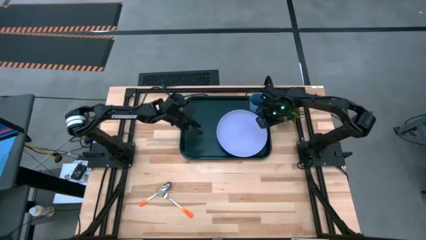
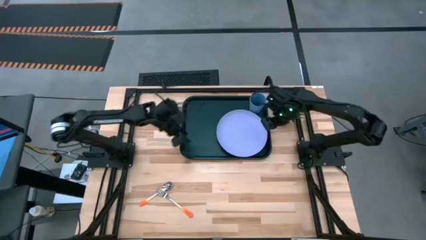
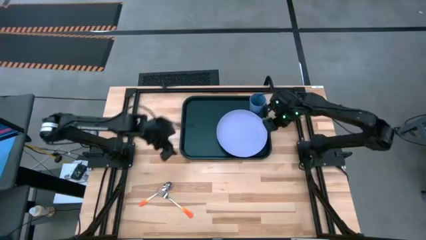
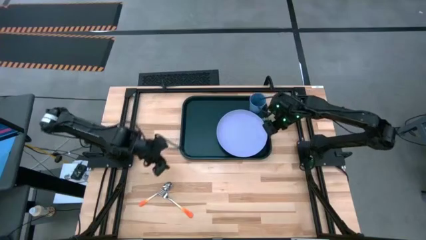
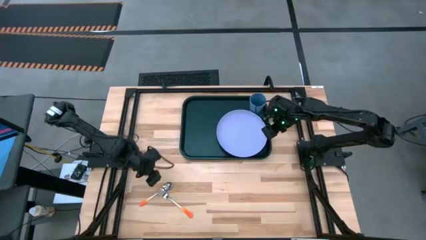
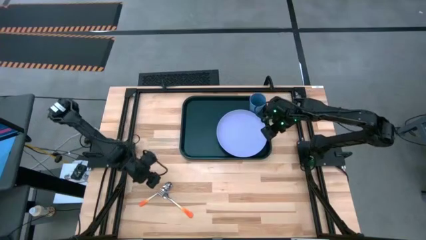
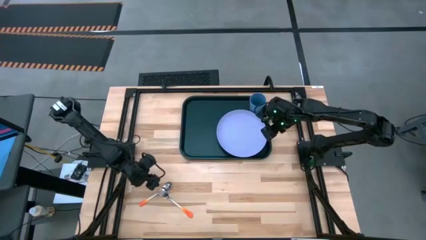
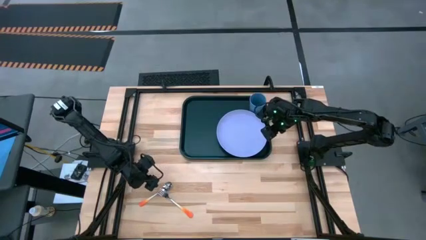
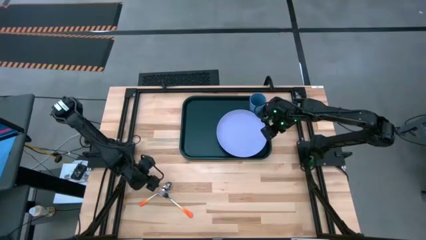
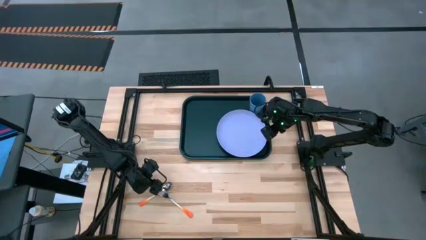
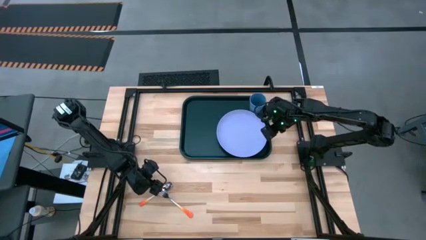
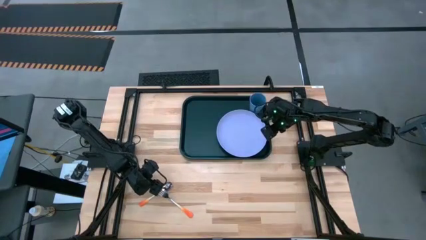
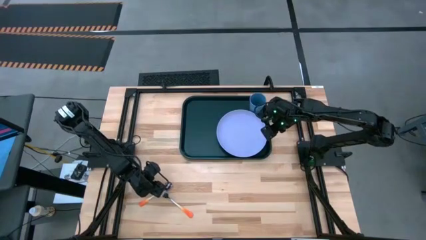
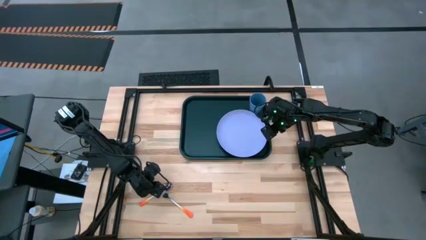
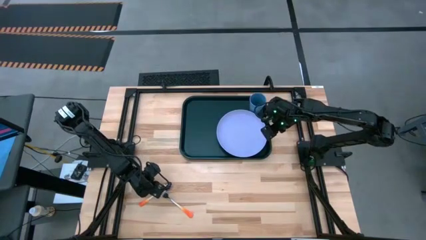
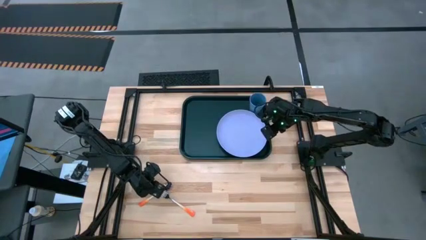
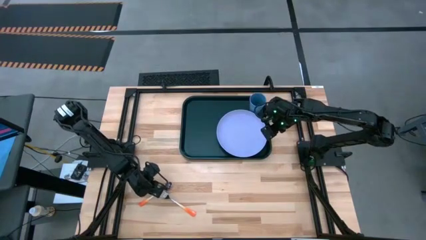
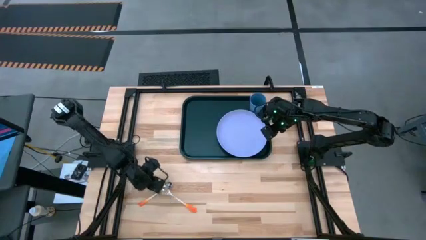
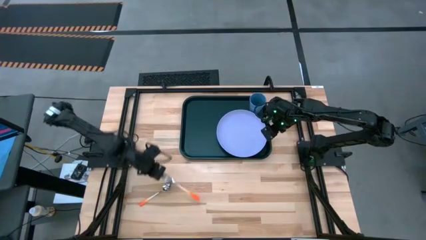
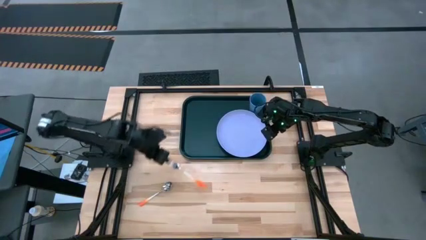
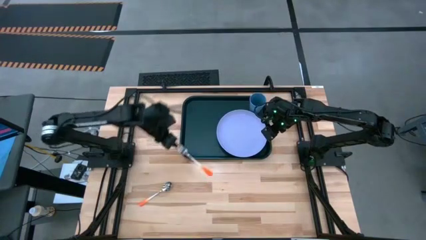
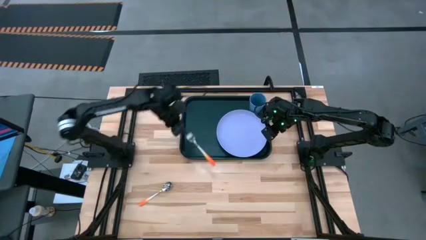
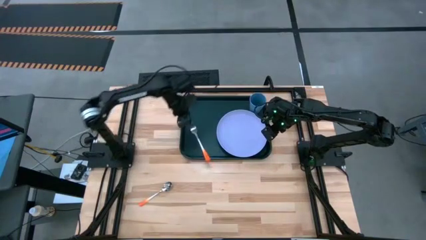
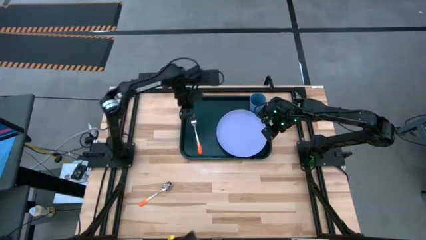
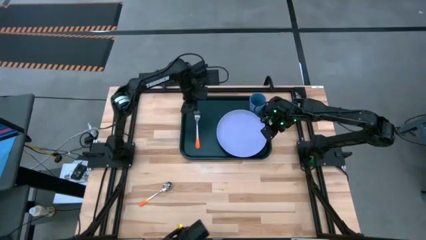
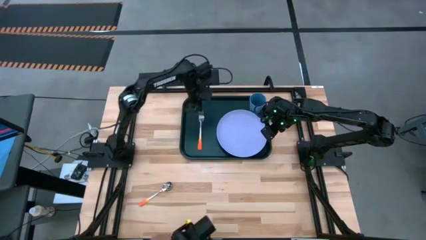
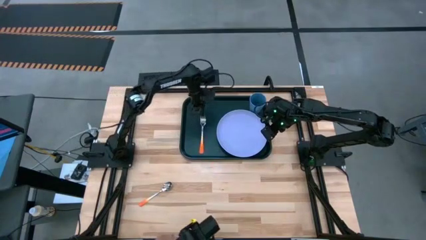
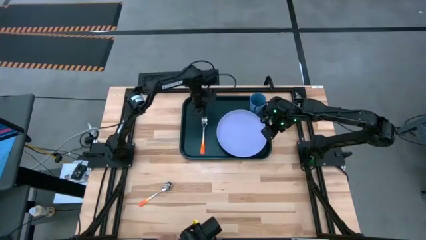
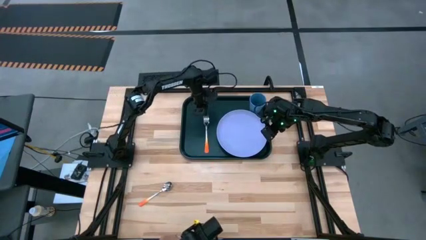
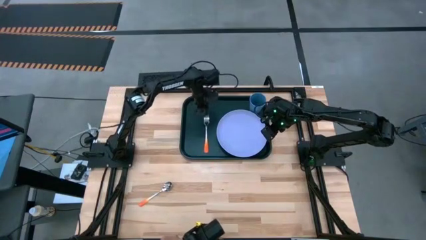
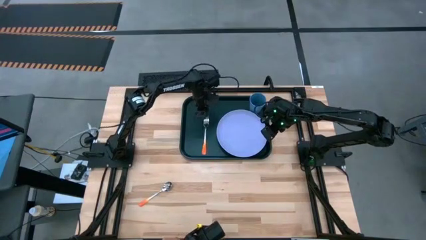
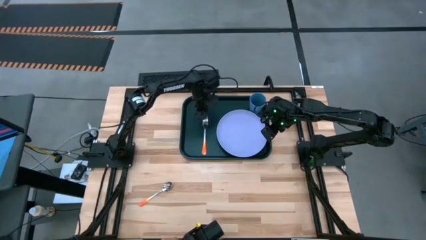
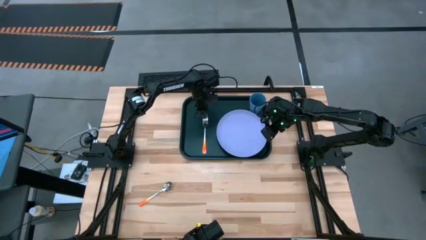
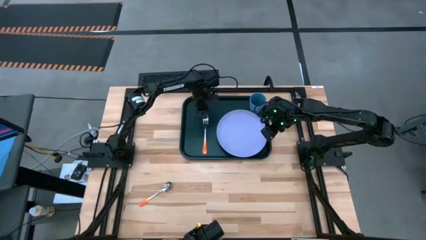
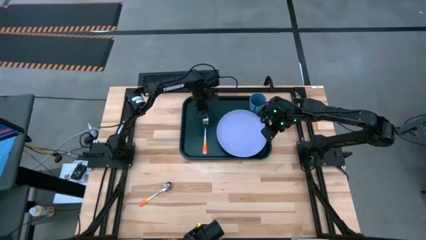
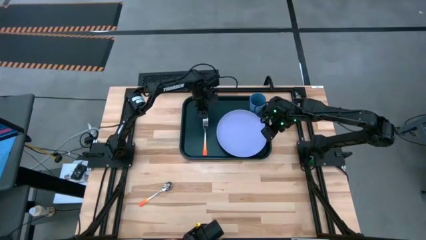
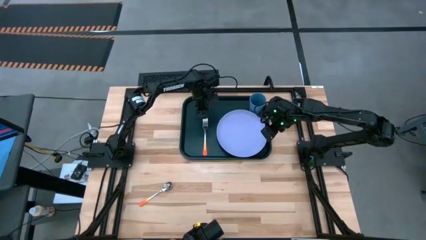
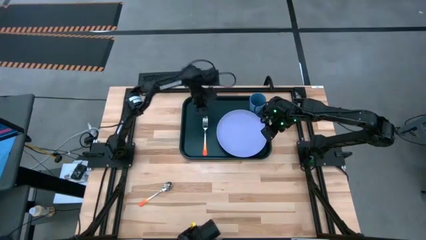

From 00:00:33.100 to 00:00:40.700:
Task: Pick and place plate/cup/fork/spoon on tray
Put the orange fork on the black tray to the left of the blue plate

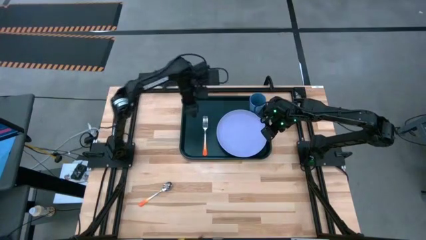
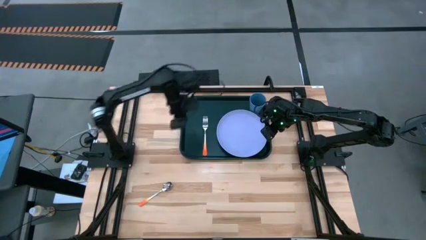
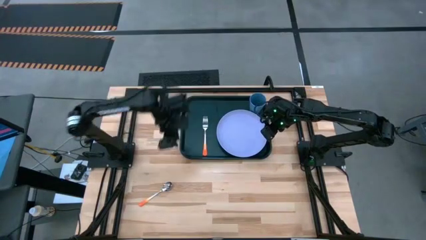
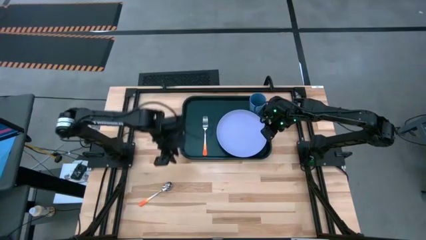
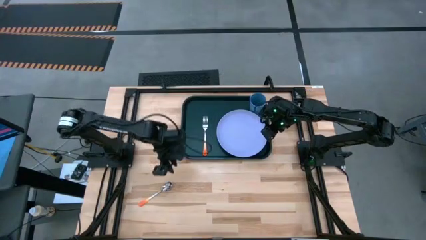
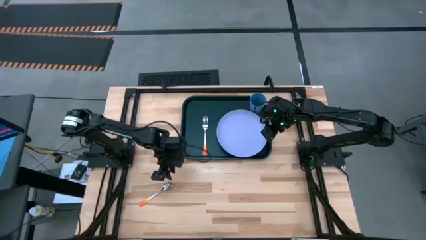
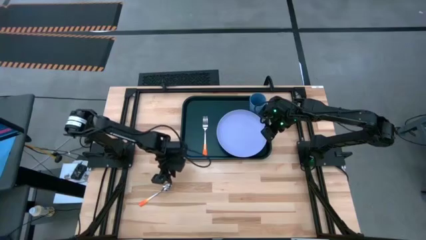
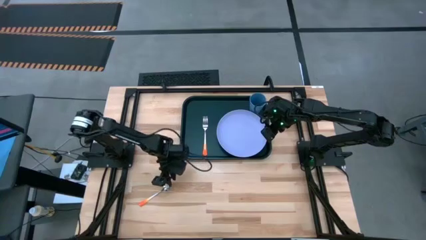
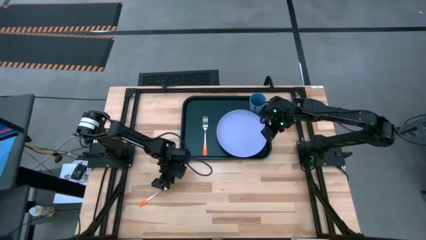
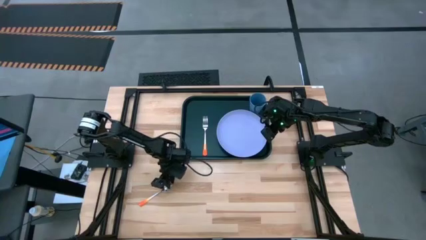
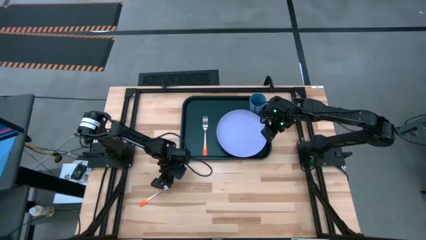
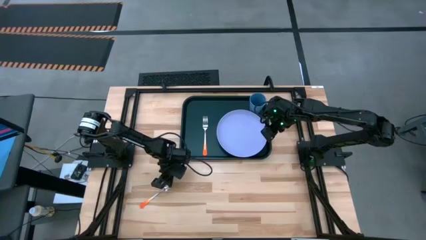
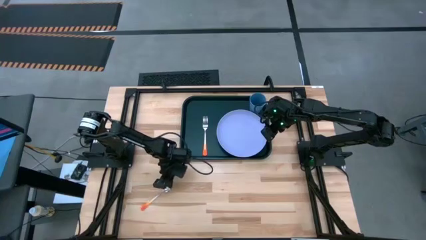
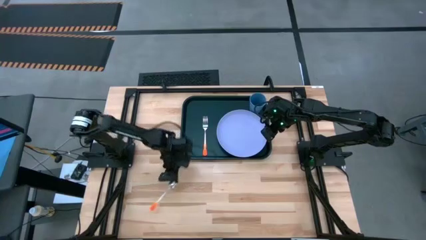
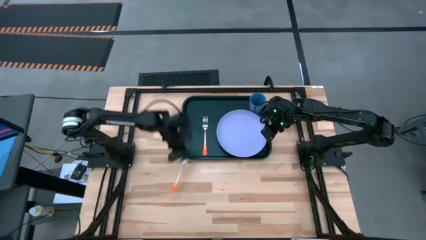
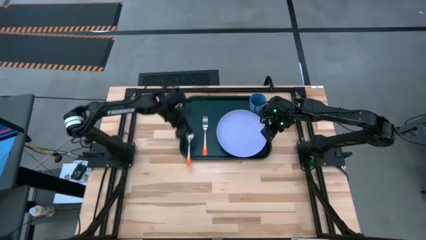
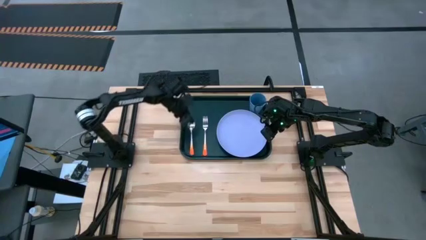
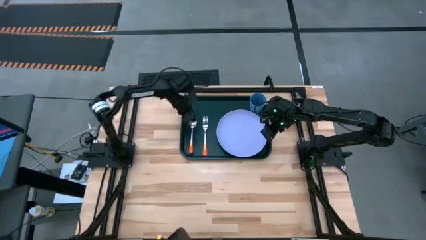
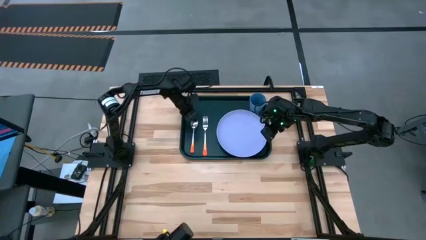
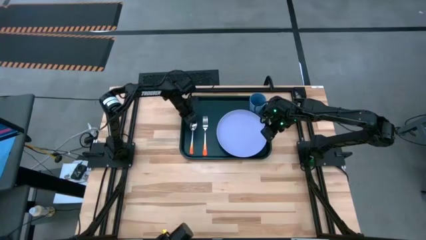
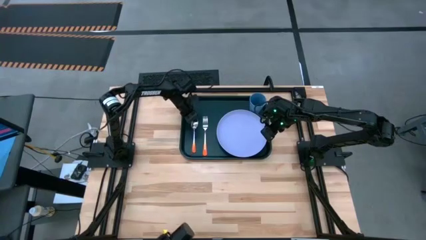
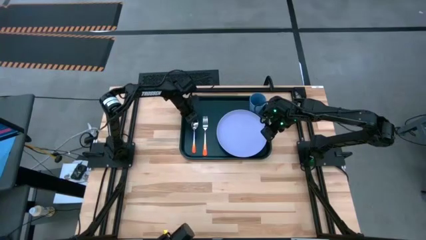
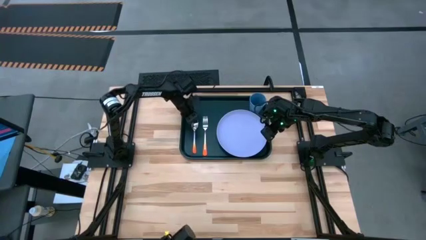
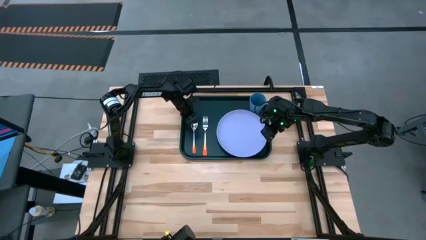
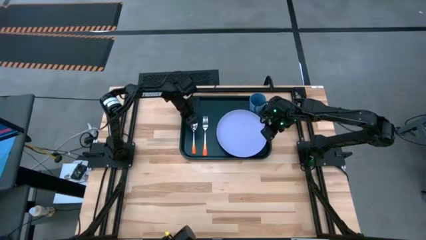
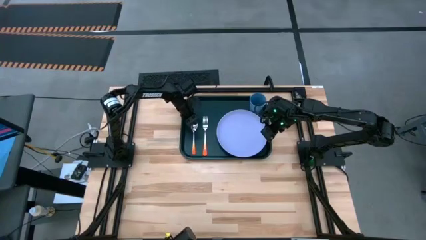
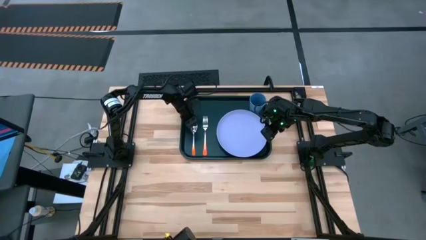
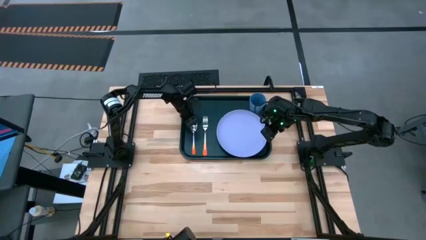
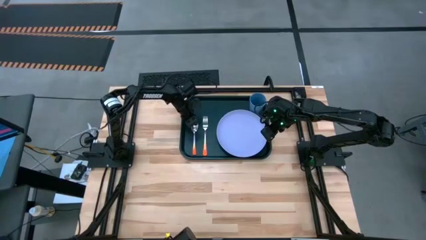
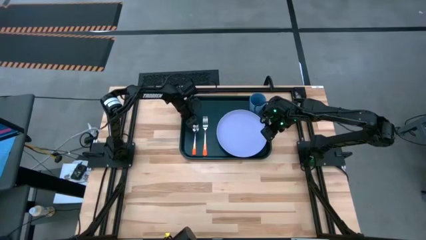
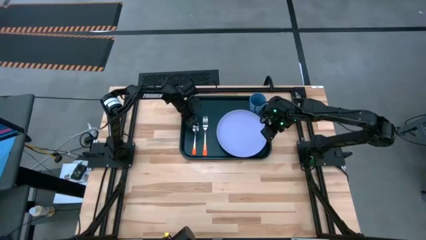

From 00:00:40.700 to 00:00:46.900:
Put the orange spoon on the black tray to the left of the orange fork

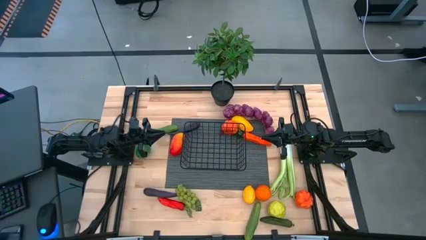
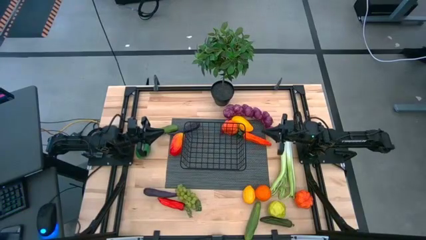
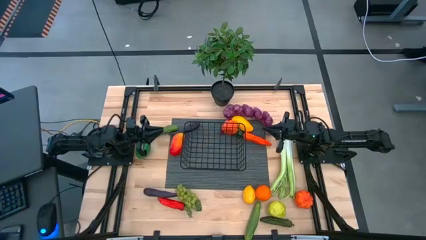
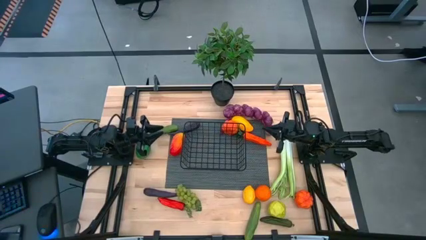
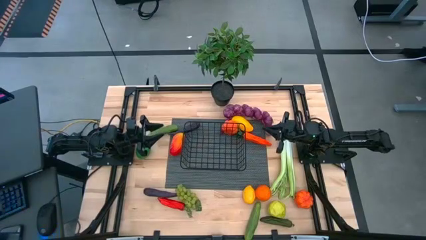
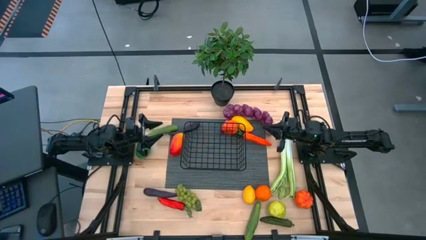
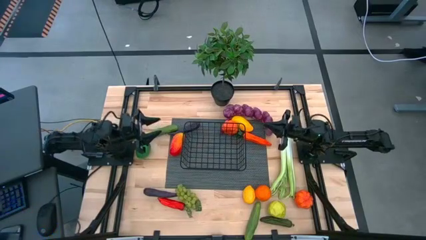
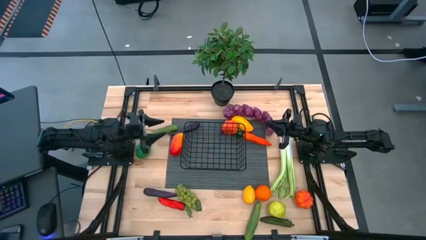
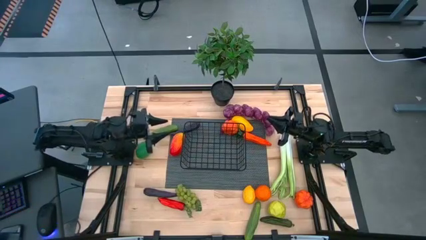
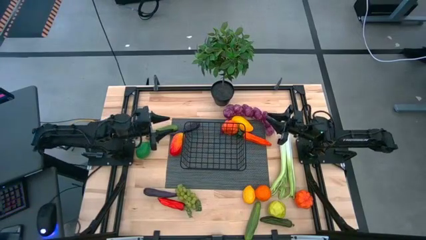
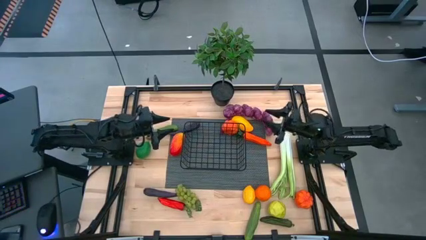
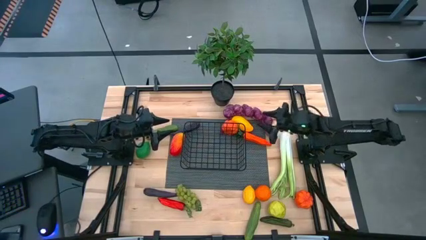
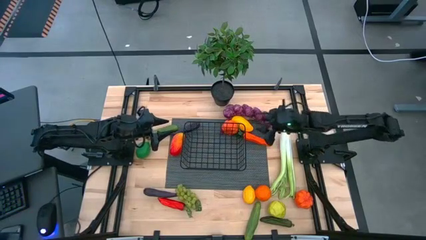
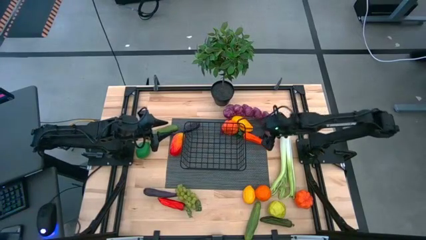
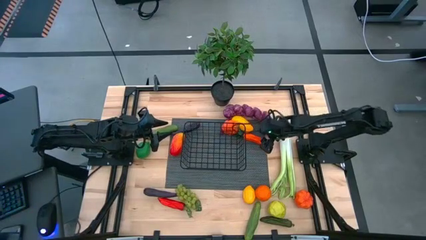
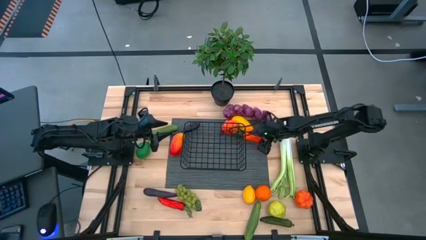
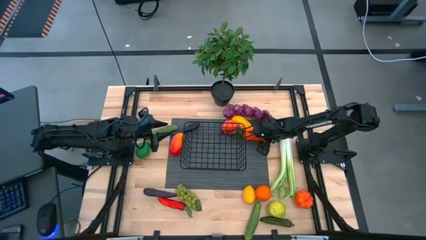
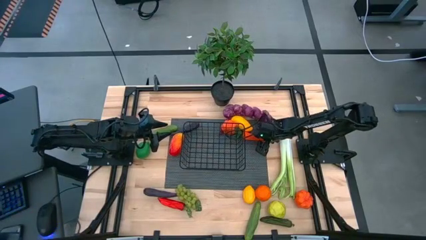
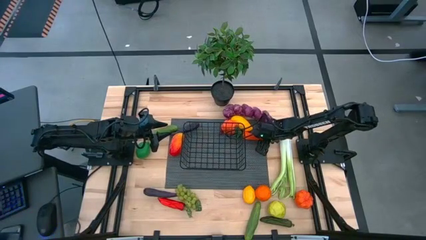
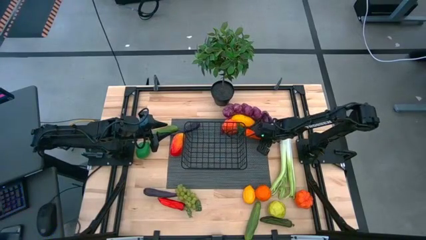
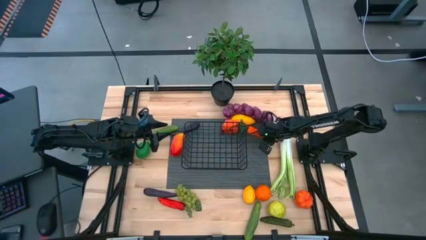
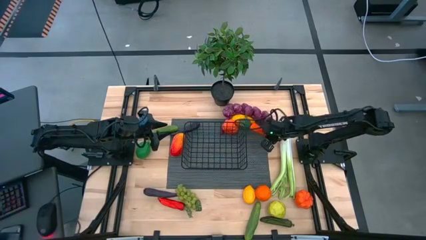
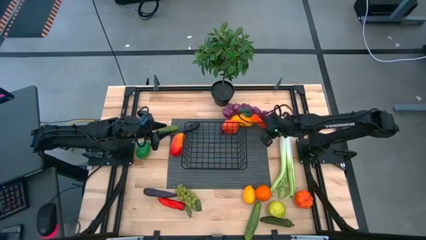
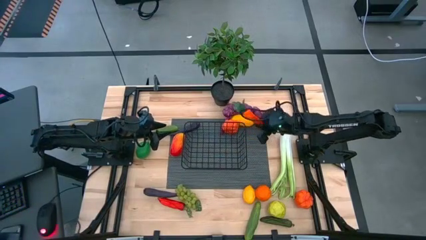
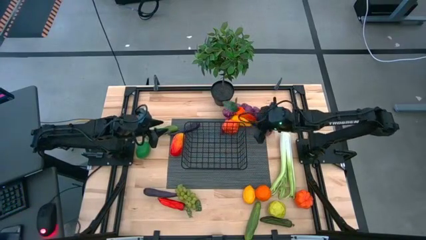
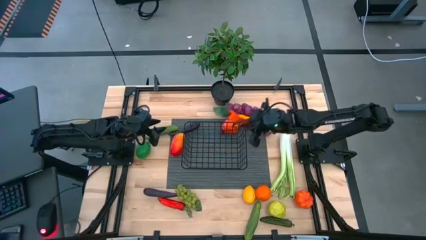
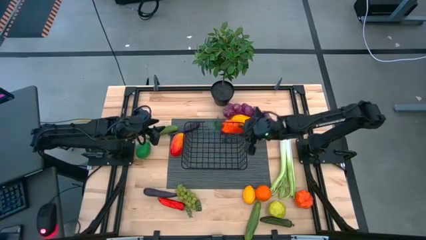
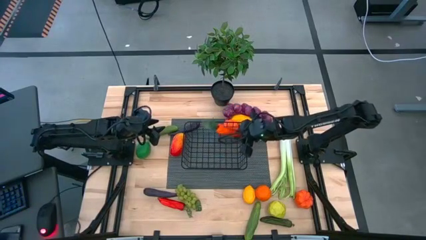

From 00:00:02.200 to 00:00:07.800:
Task: Build produce basket
Put the carrot into the wire basket
